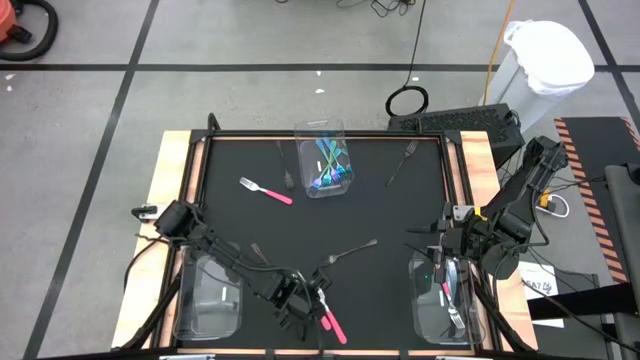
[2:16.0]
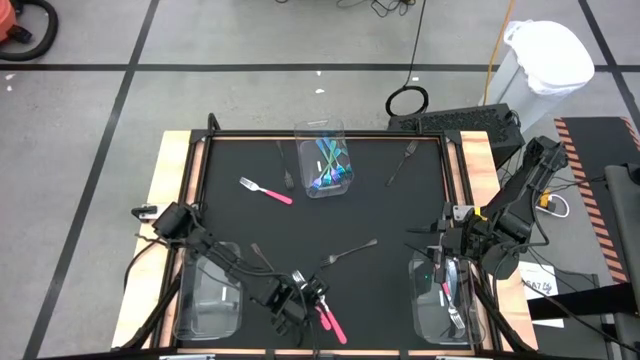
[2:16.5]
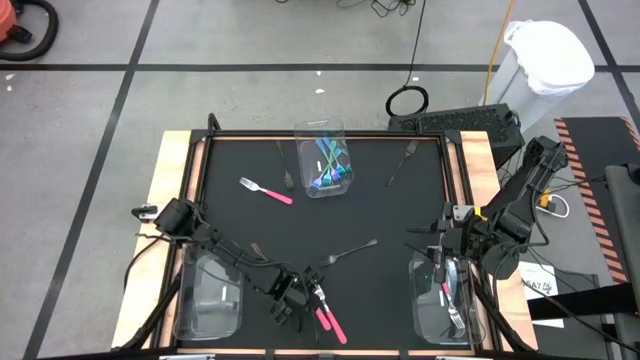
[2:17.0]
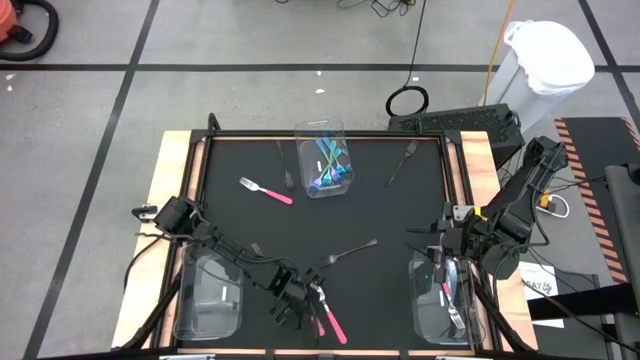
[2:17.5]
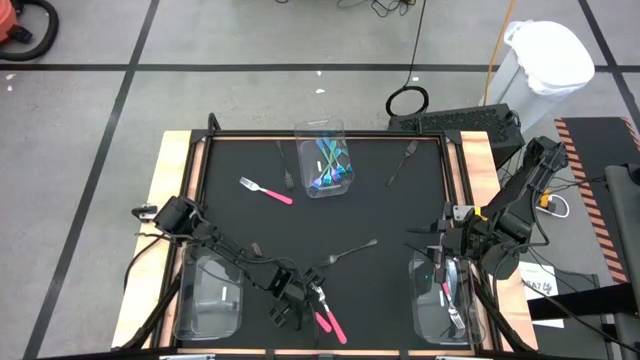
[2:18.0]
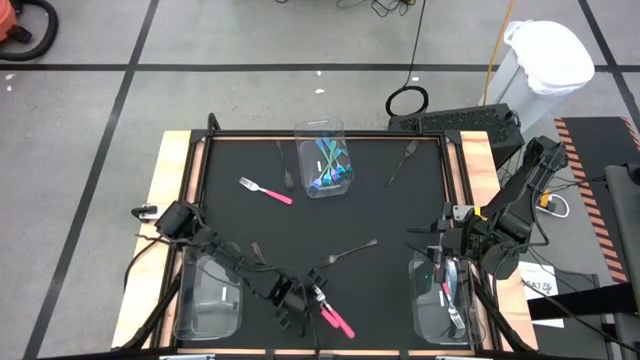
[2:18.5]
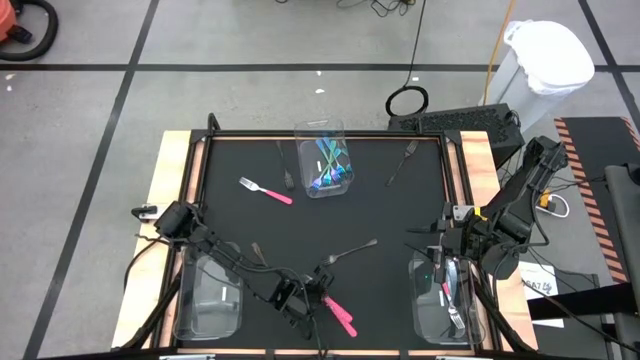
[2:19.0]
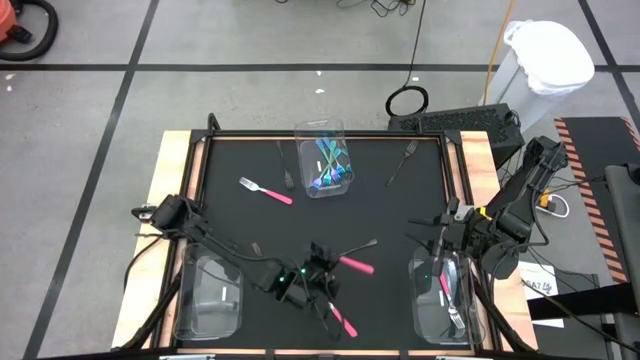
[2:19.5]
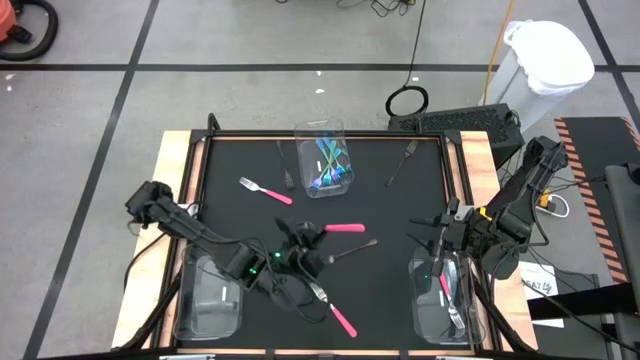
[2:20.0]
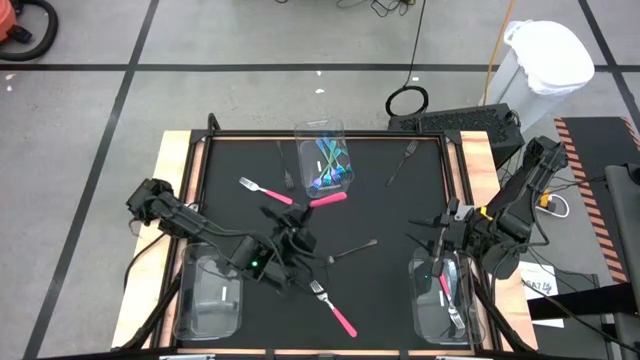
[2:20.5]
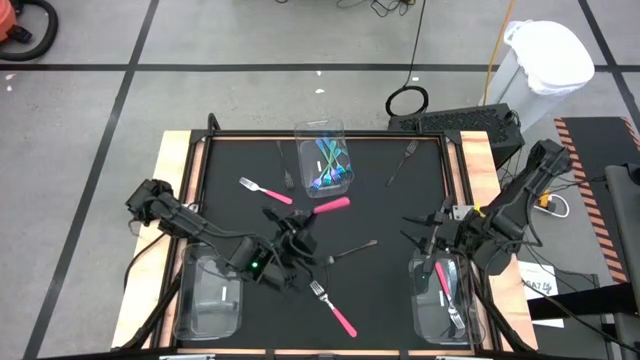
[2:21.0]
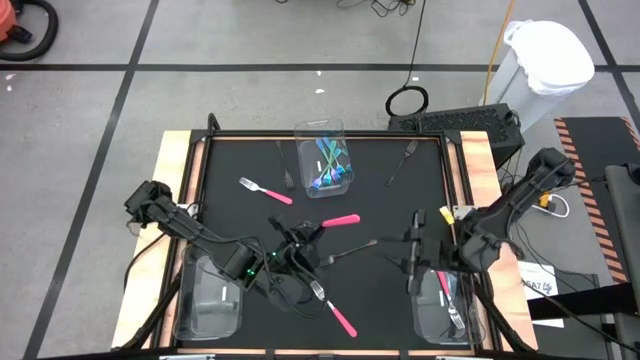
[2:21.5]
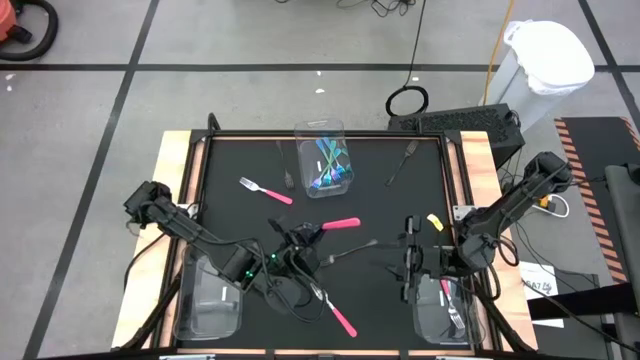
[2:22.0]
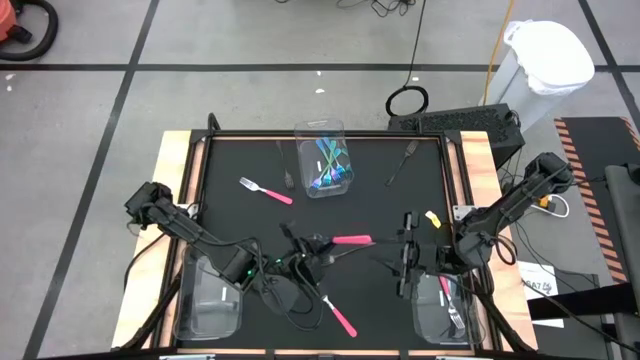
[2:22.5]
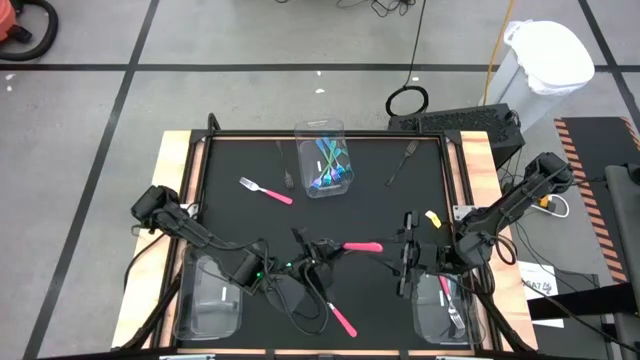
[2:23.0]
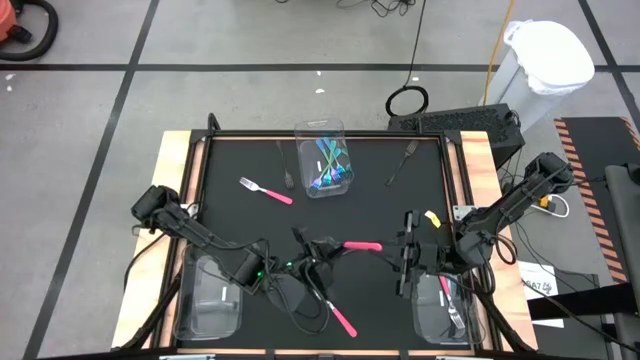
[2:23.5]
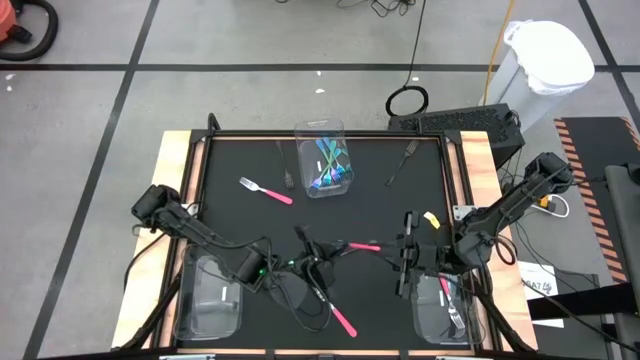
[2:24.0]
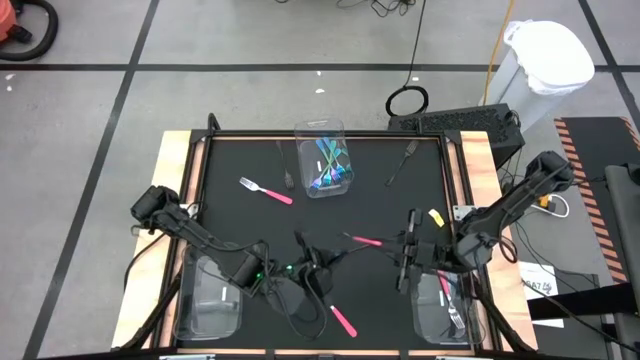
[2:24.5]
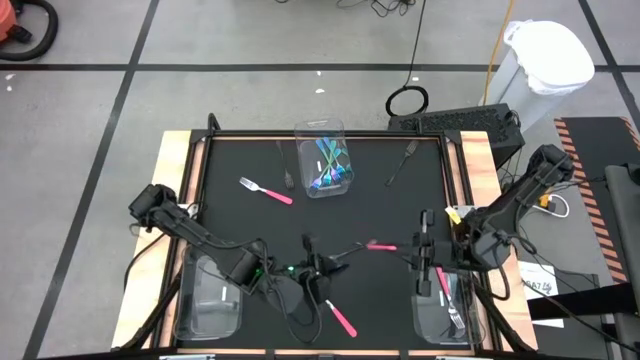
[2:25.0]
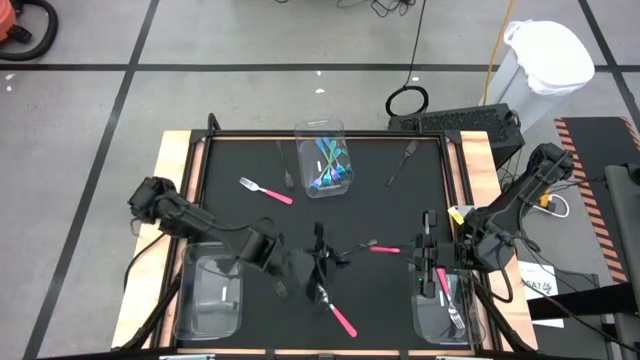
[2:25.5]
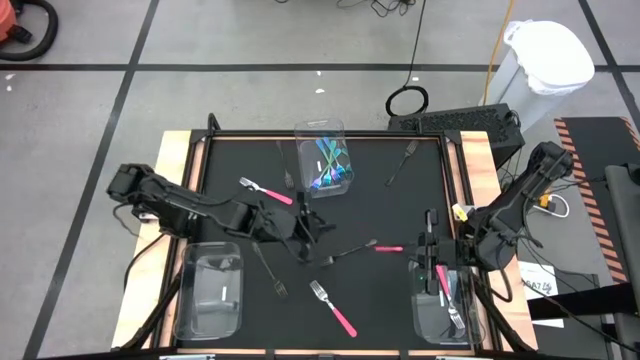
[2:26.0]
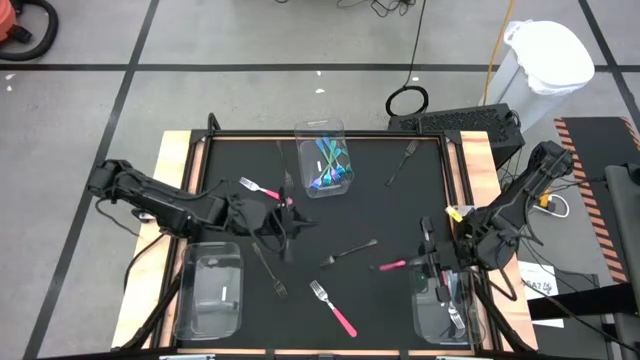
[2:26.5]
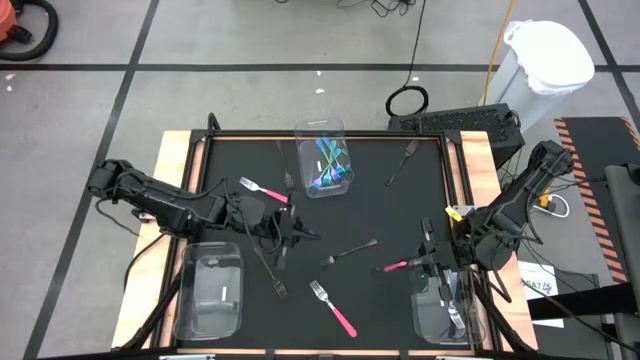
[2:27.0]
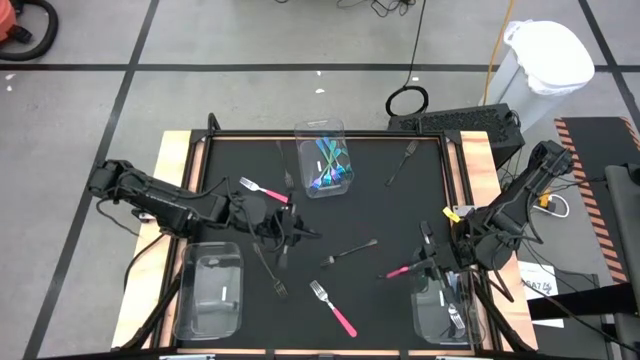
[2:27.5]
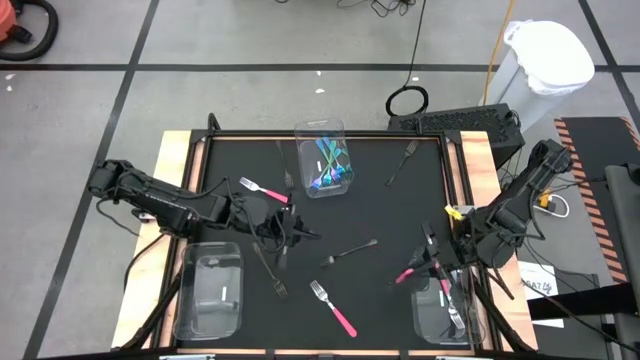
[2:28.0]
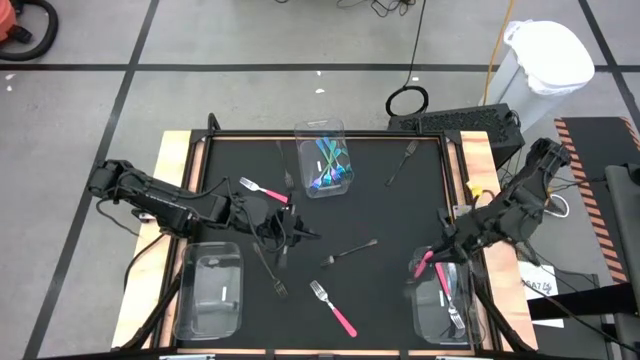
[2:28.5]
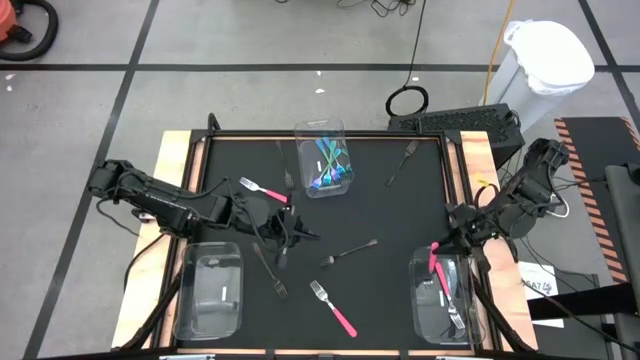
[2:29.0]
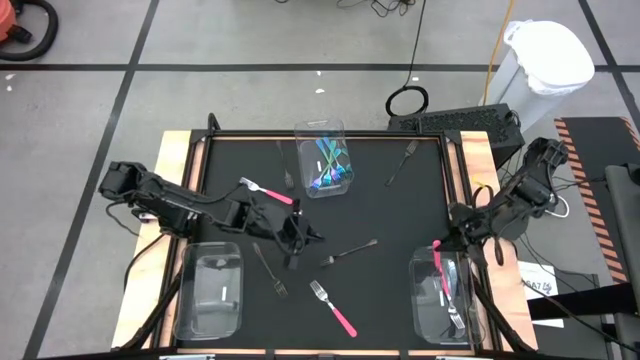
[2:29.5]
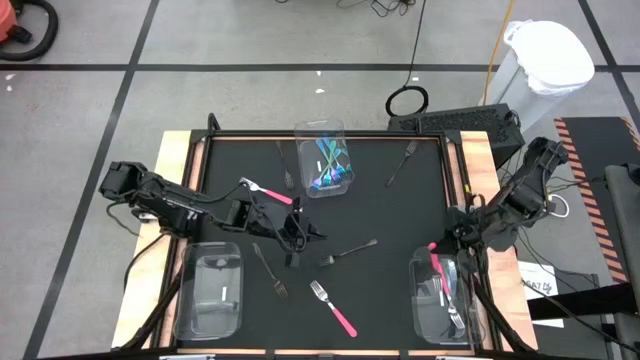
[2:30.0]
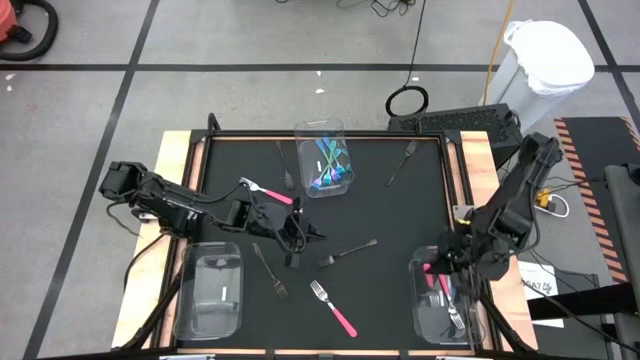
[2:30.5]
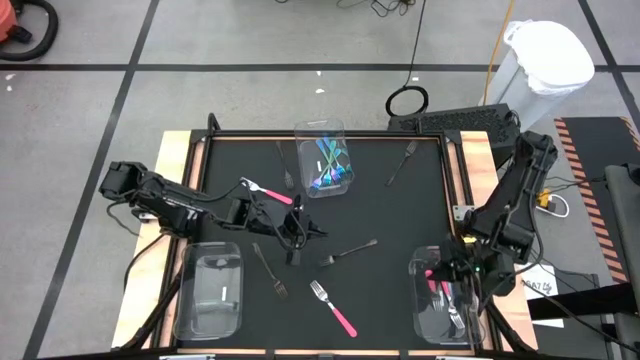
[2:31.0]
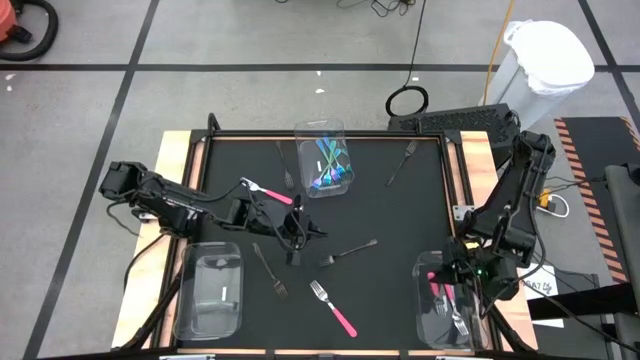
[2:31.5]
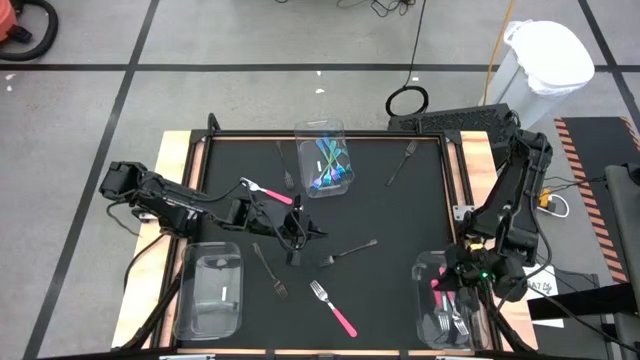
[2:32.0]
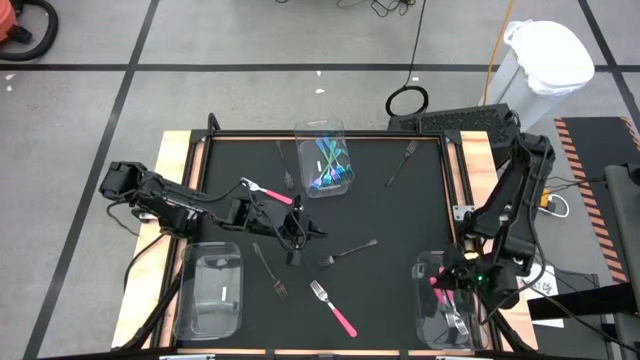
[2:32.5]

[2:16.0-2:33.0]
Task: Sort silverware by color (type)
Put the pink fork into the bottom right transparent bin

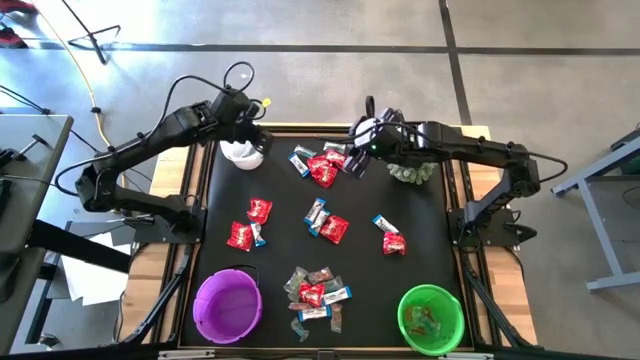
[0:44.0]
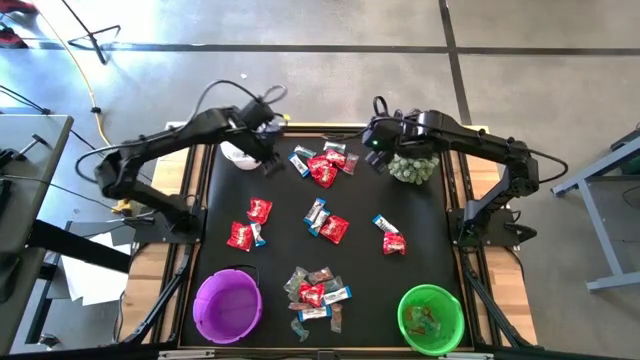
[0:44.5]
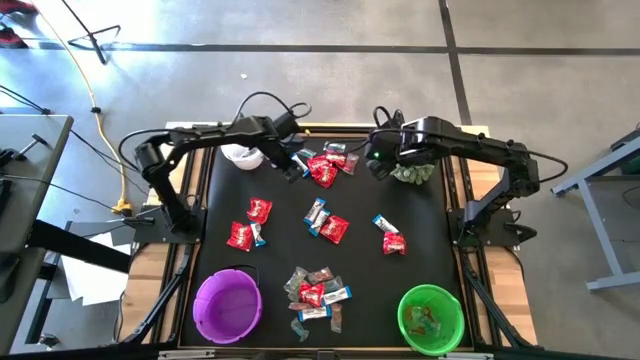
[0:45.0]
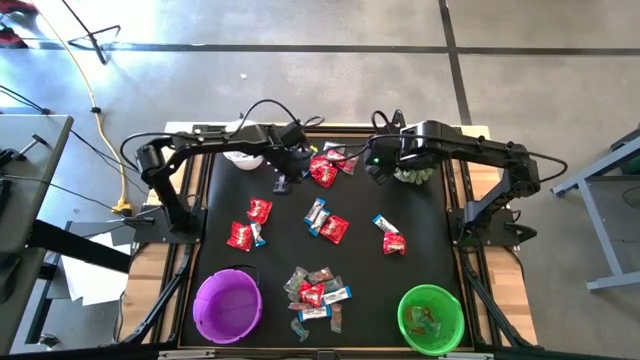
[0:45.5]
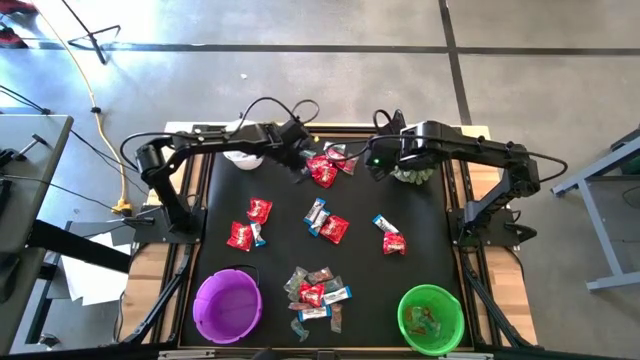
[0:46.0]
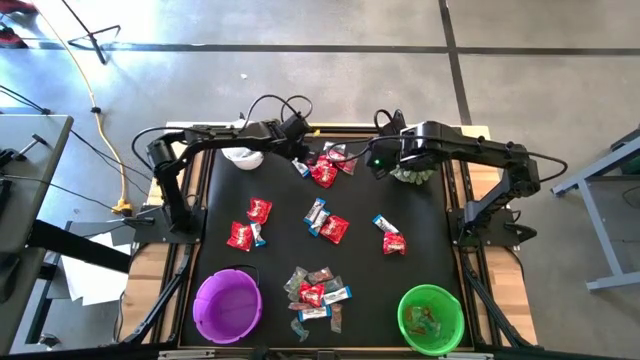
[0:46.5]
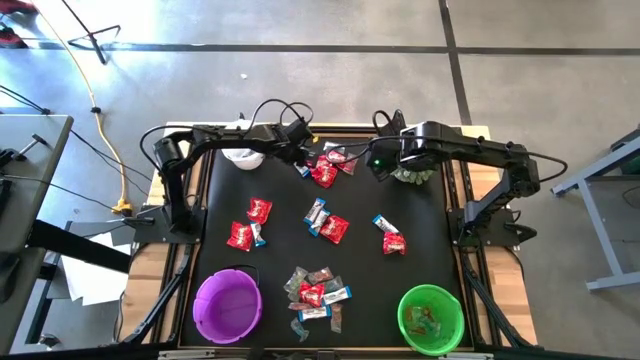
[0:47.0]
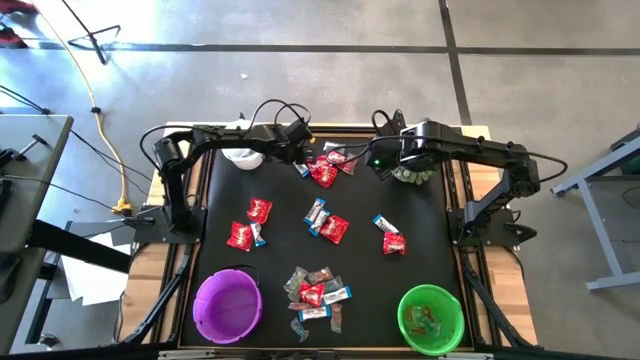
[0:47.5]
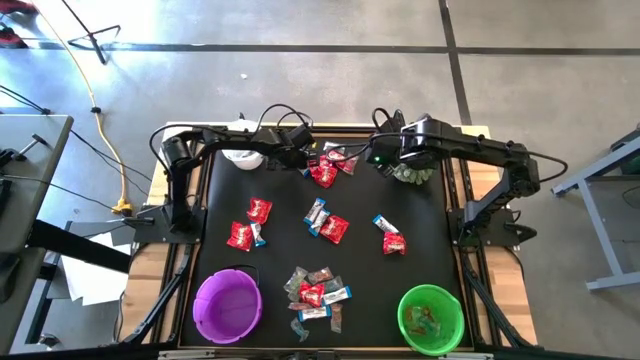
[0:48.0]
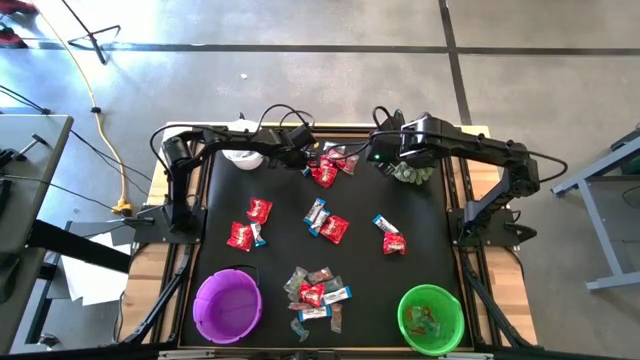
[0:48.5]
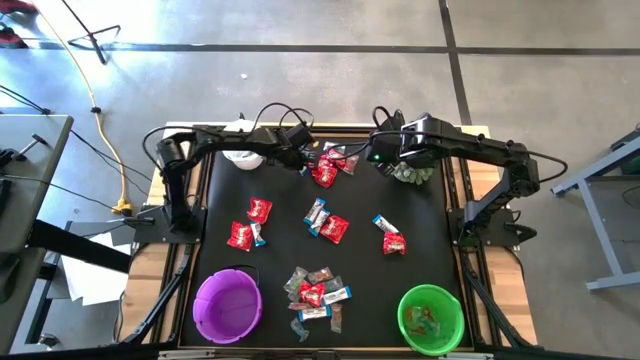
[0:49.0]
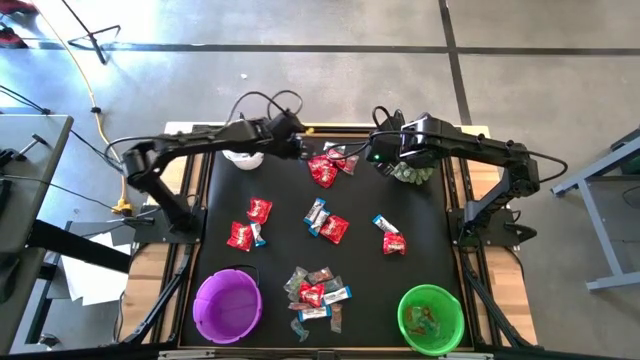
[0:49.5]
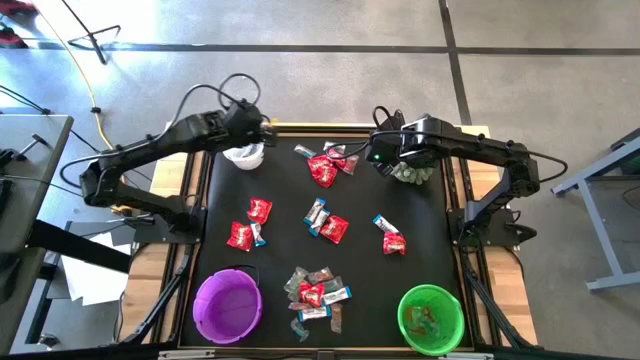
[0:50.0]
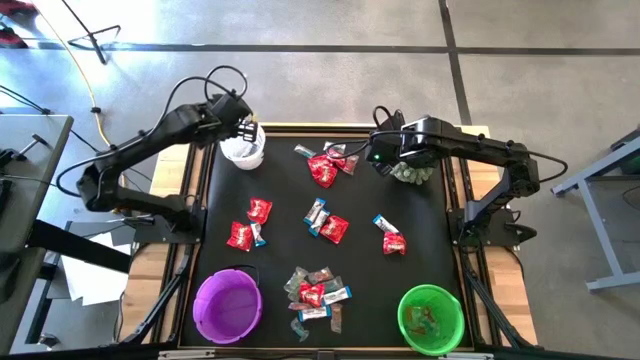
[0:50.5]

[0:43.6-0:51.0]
Task: Sort candy
Put the white chocolate into the white bucket
